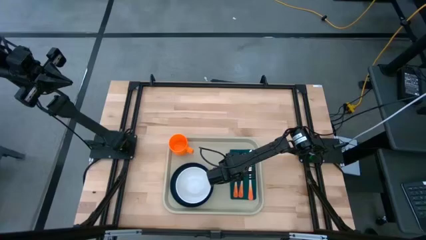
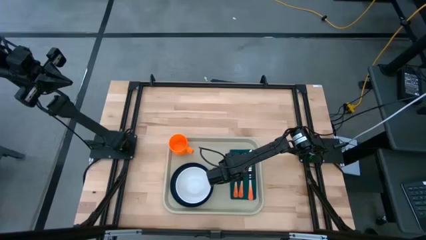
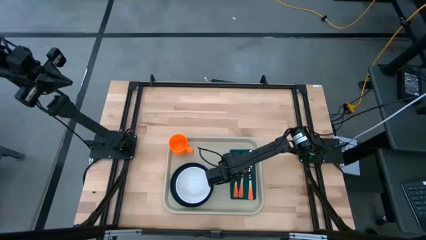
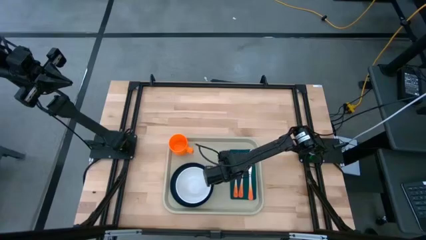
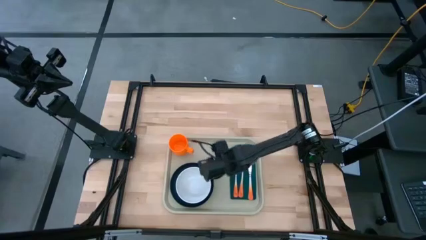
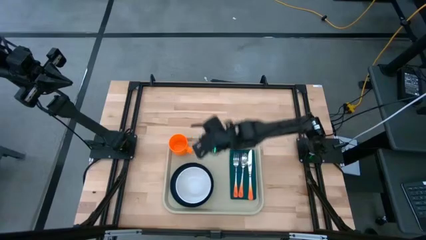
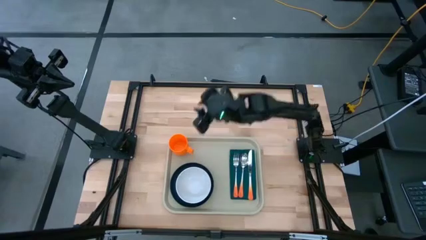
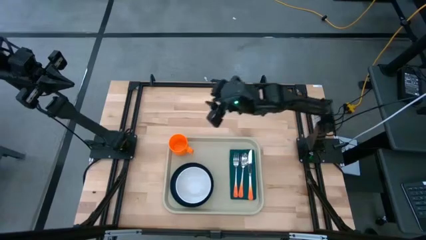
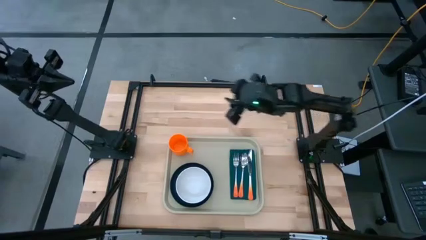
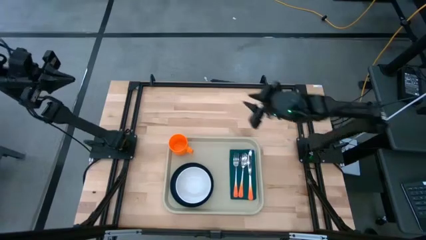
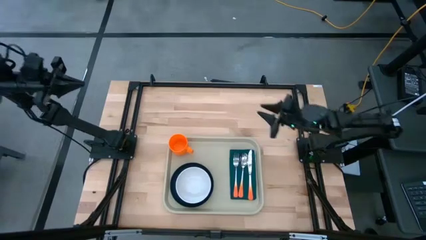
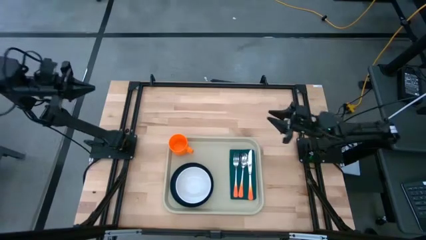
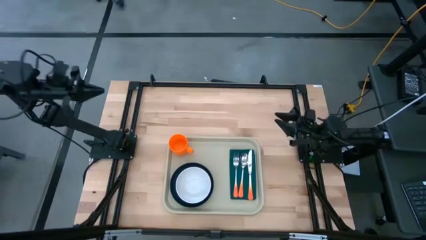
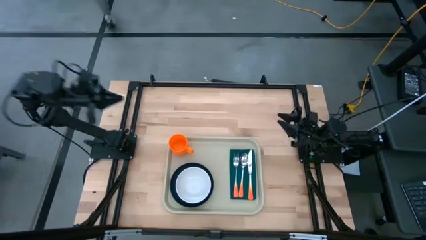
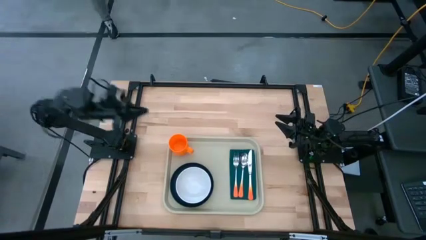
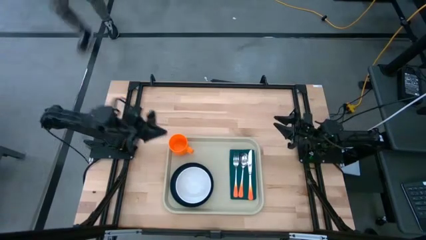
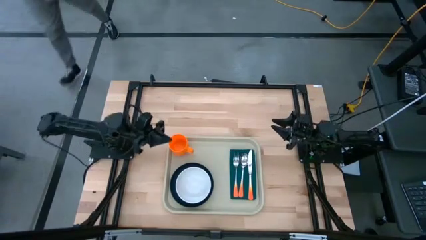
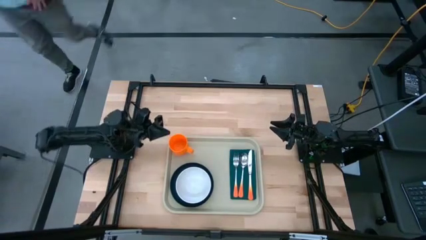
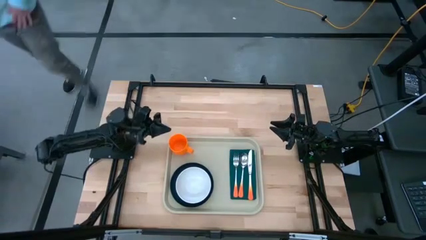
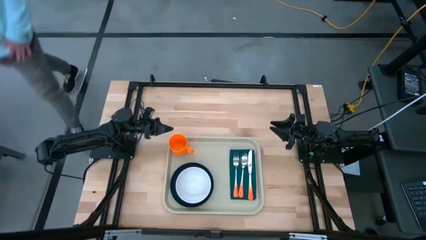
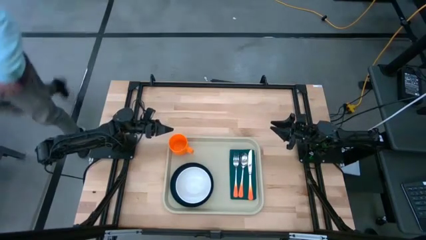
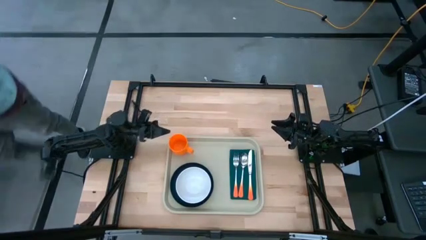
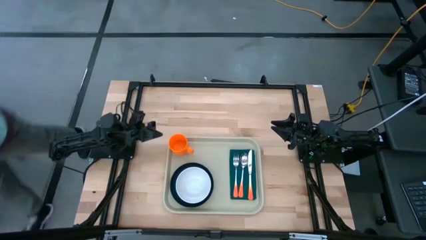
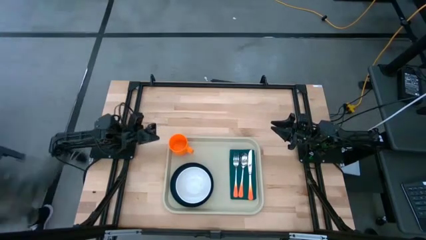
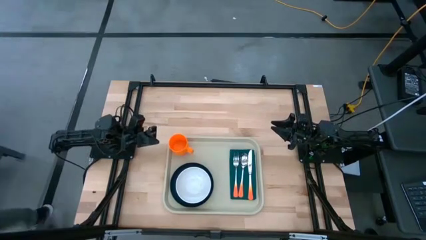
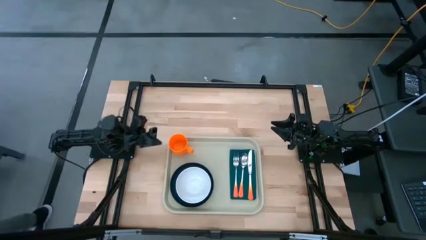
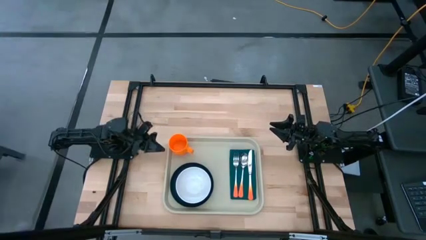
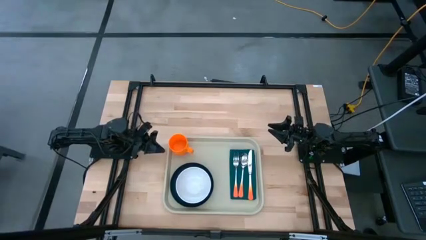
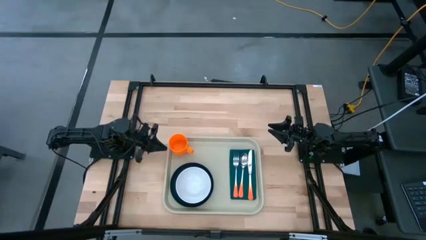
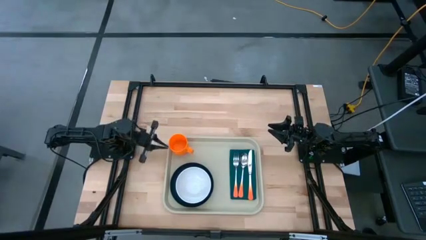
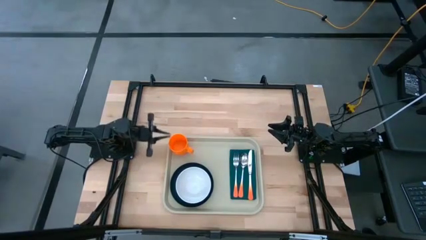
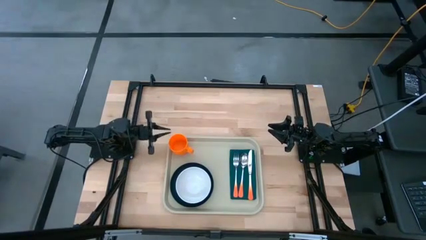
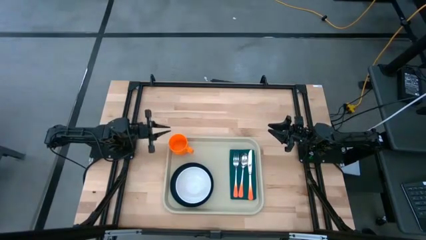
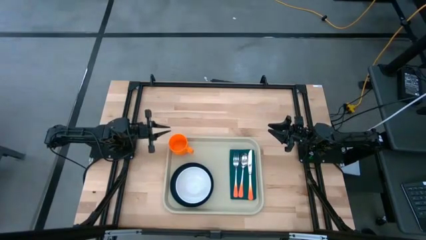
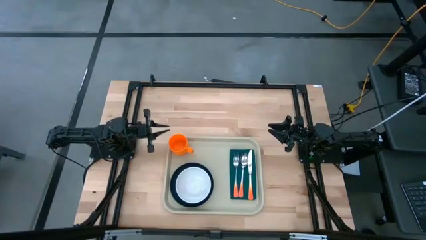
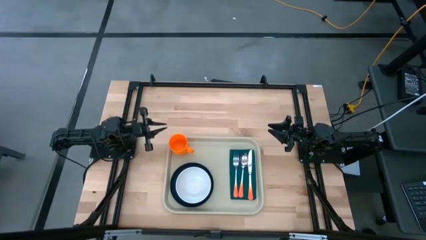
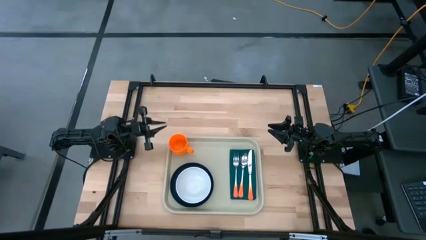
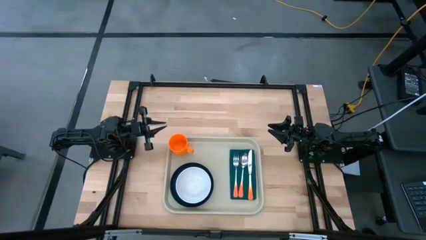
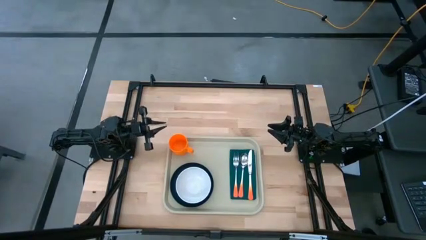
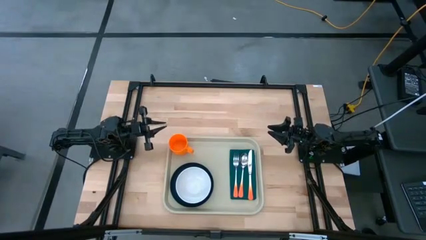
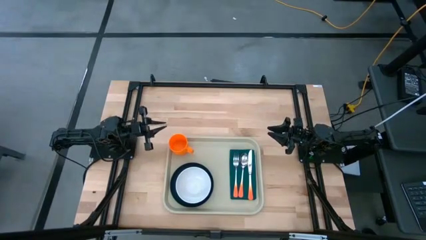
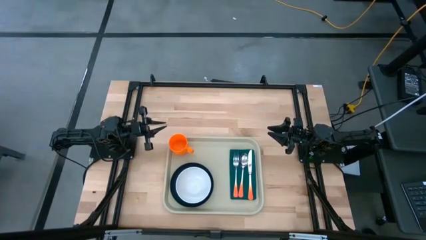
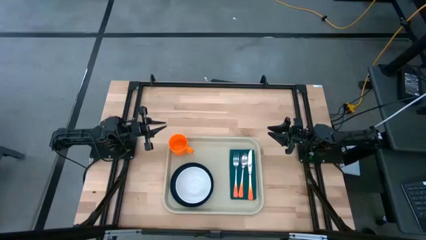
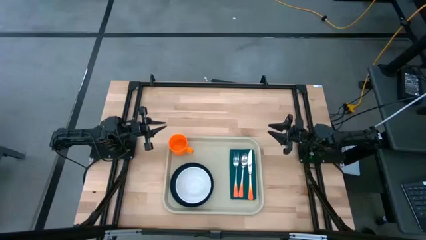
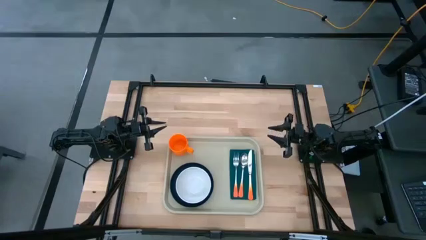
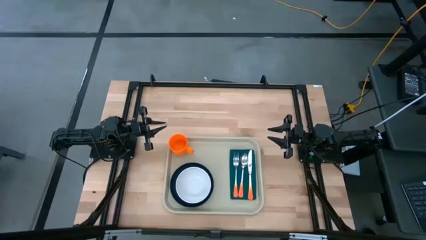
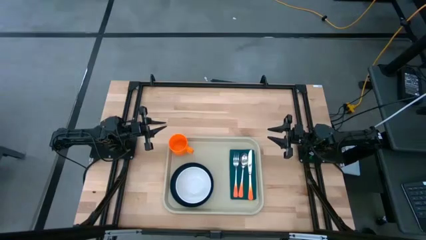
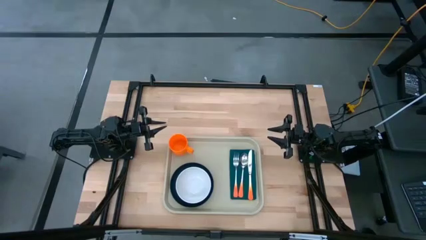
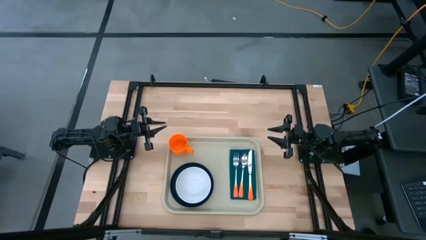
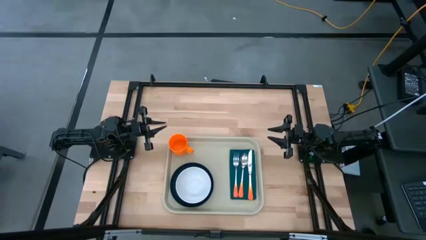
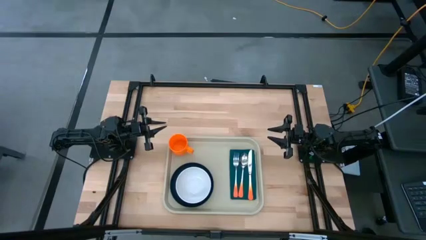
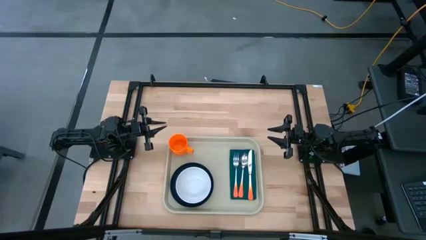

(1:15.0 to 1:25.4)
Task: Set up tray
Return to Home Position

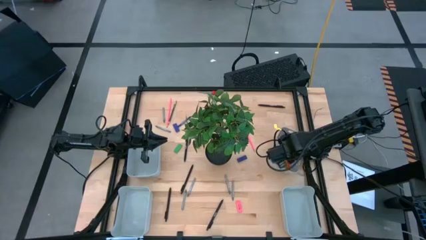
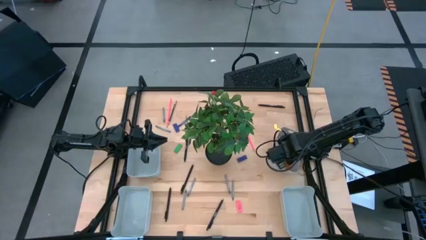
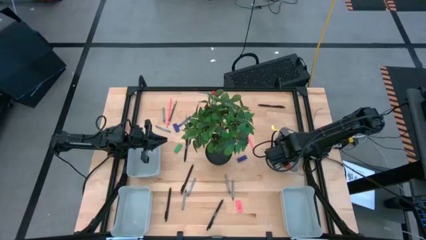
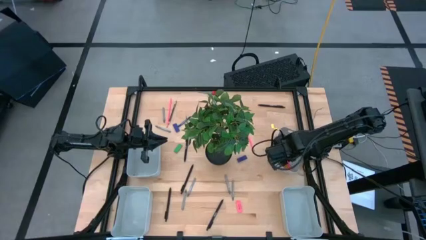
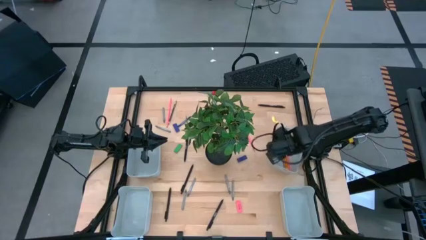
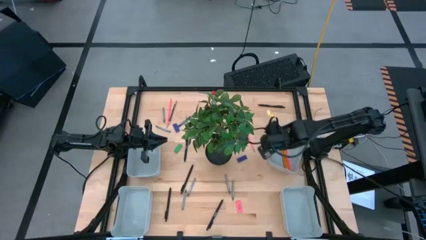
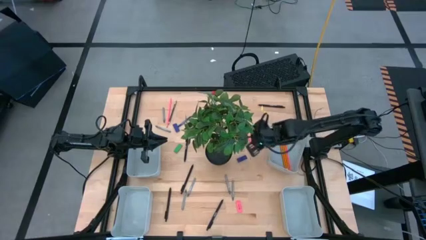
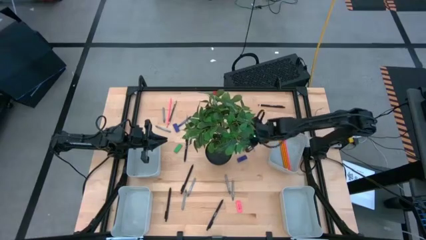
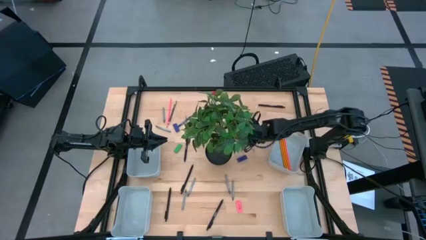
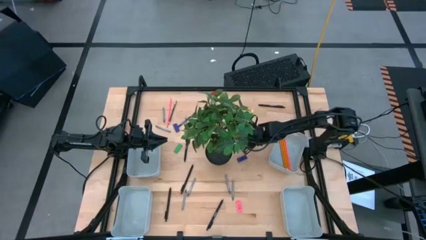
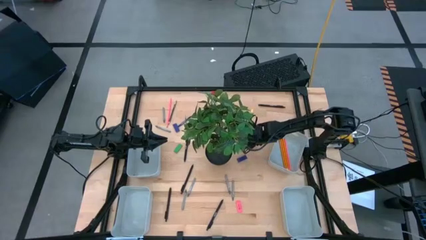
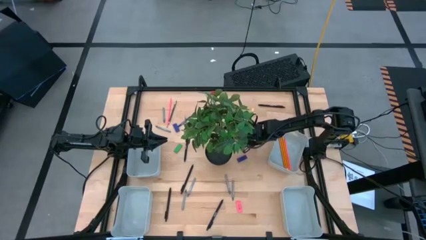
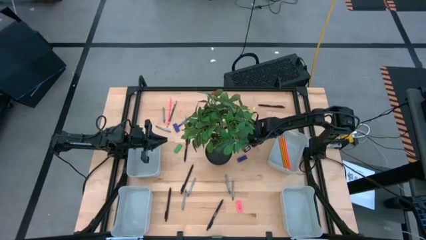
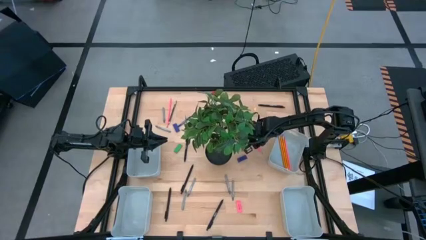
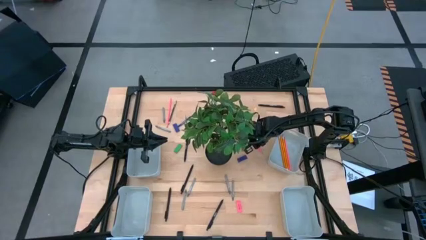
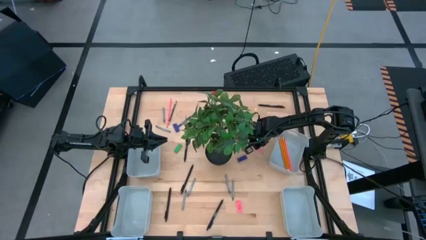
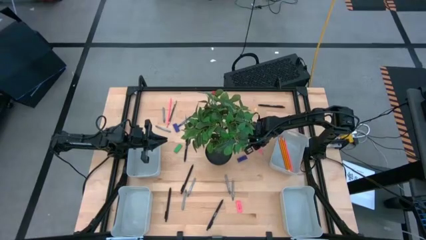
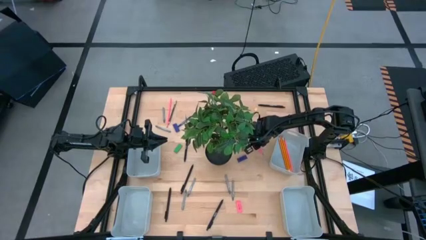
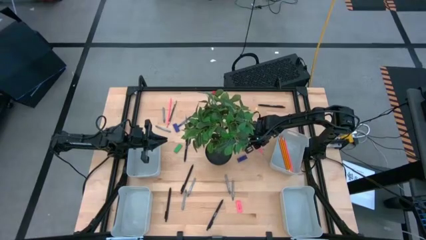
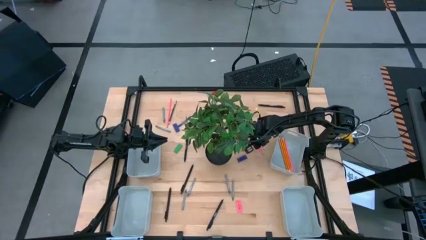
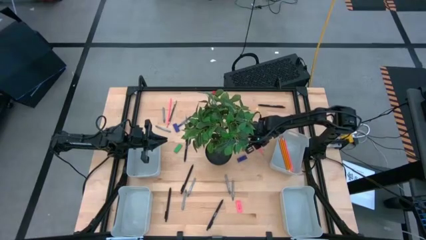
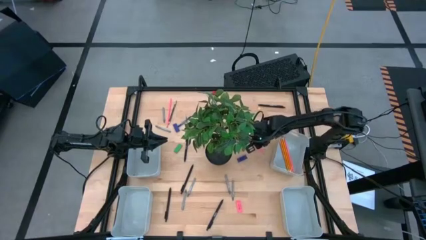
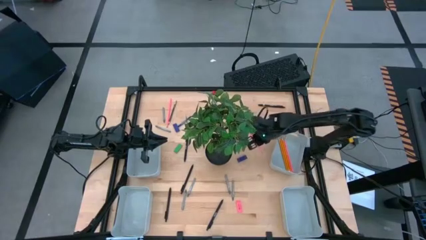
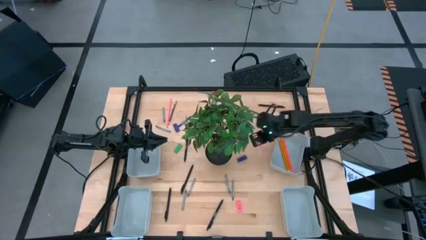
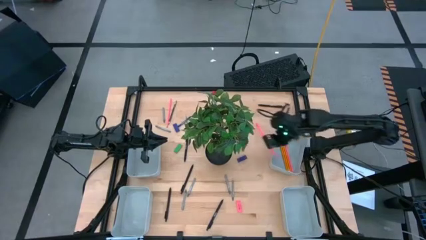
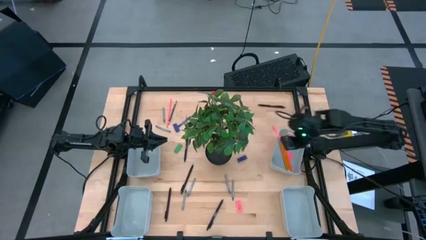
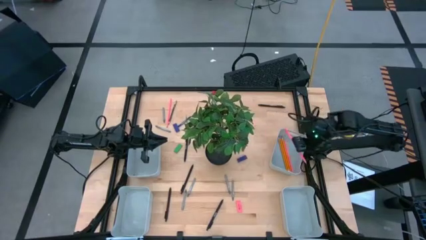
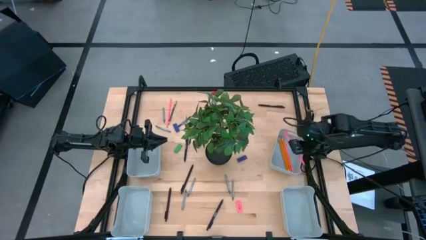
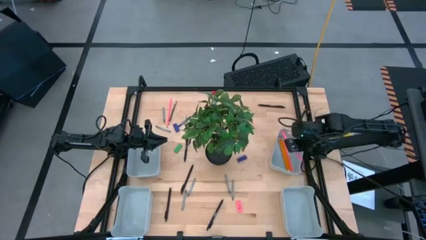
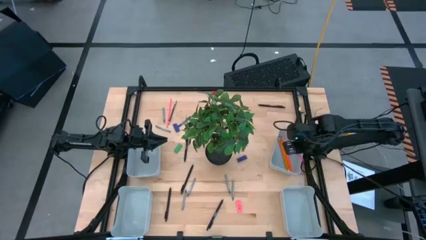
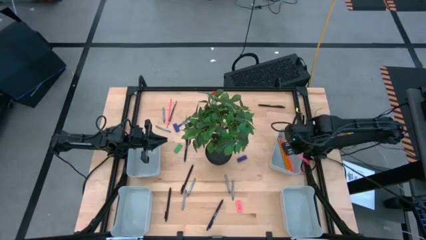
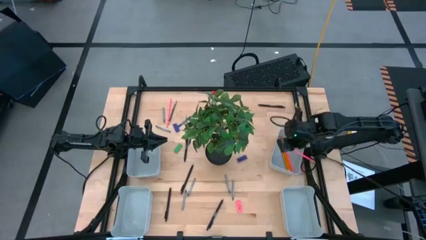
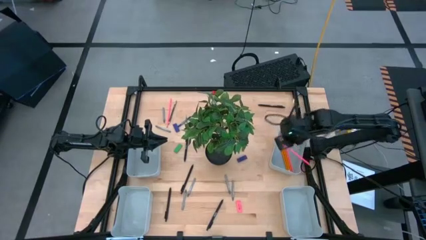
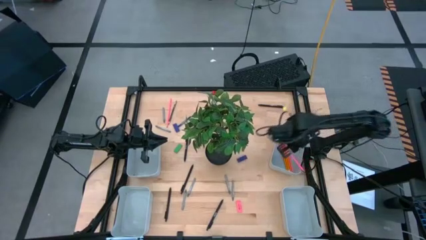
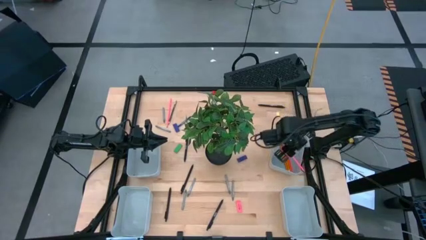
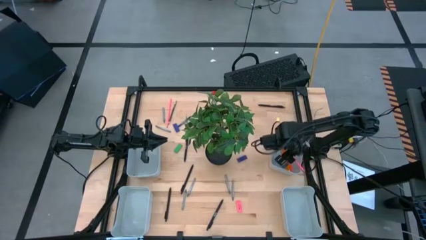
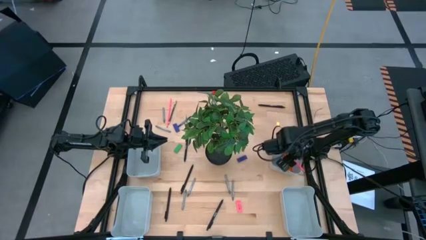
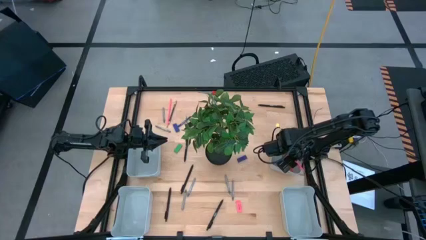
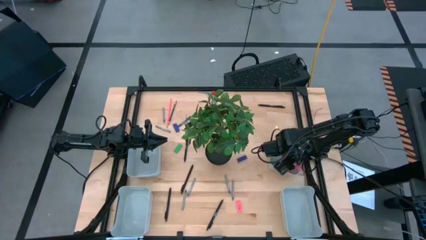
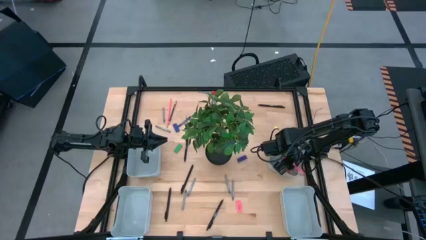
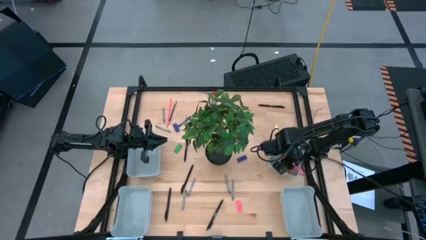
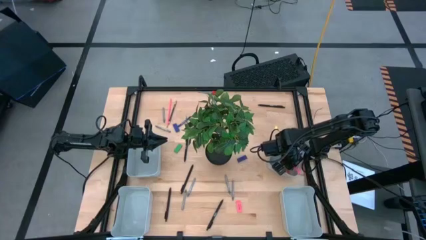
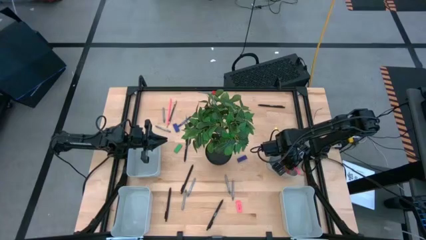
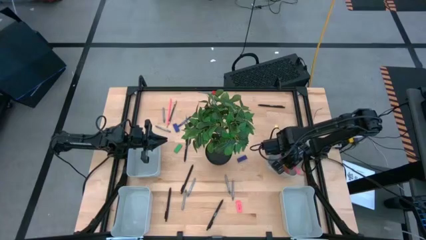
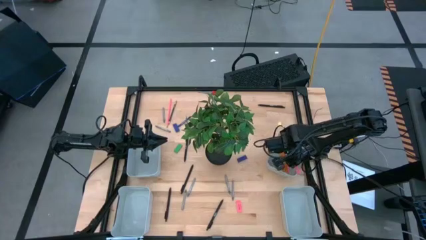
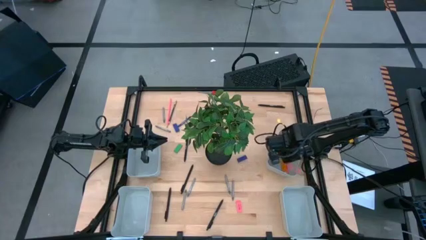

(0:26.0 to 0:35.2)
Task: Sort crayons/erasers/pens/pencils in bins
Put the pink pencil into the top right gray bin
